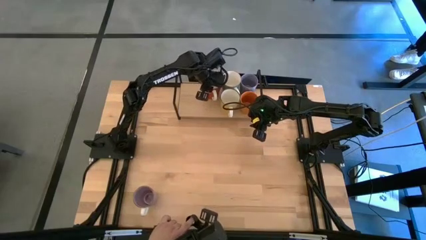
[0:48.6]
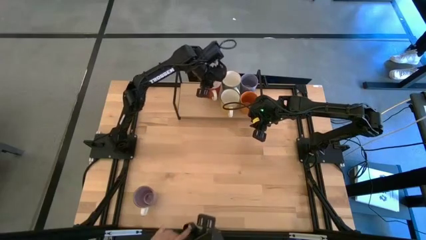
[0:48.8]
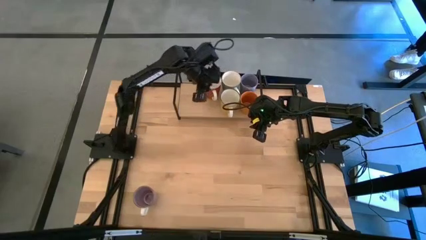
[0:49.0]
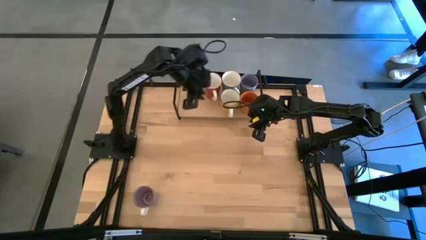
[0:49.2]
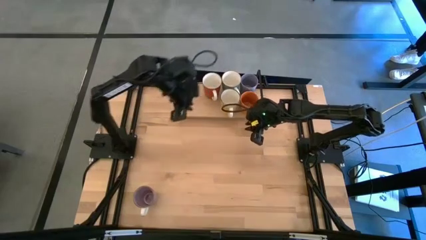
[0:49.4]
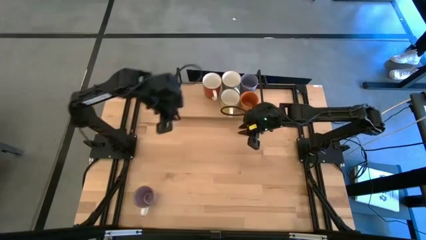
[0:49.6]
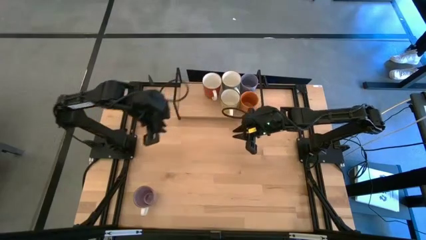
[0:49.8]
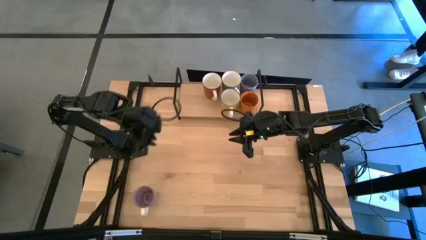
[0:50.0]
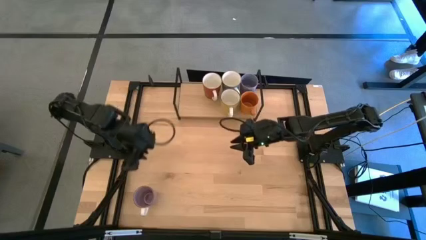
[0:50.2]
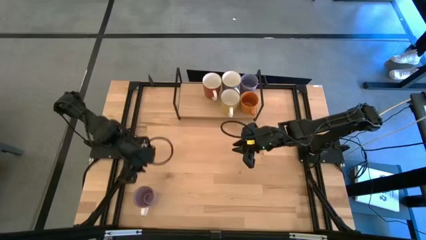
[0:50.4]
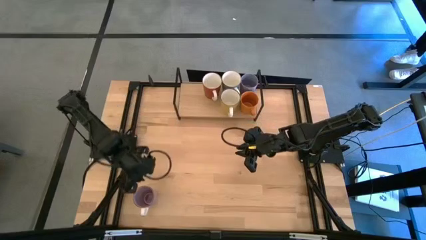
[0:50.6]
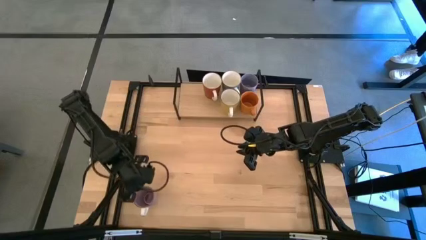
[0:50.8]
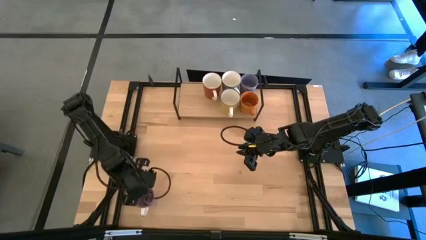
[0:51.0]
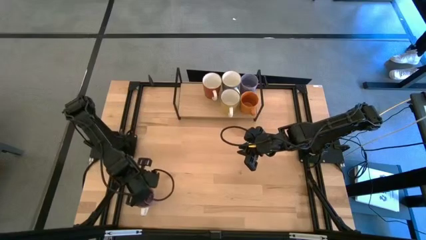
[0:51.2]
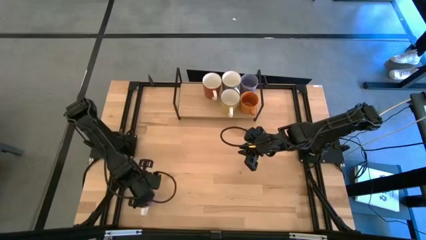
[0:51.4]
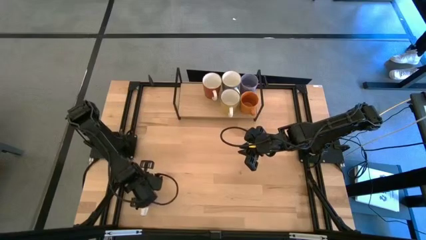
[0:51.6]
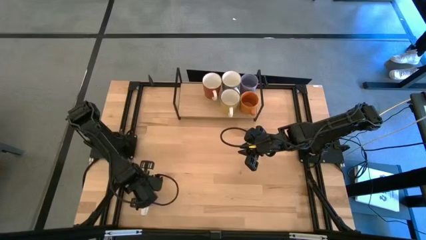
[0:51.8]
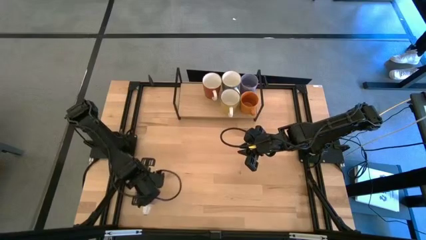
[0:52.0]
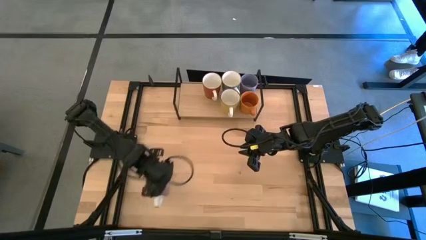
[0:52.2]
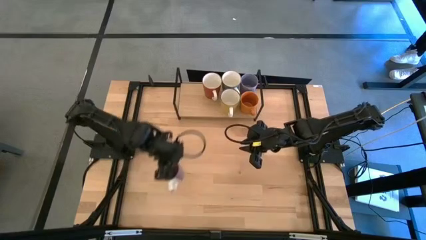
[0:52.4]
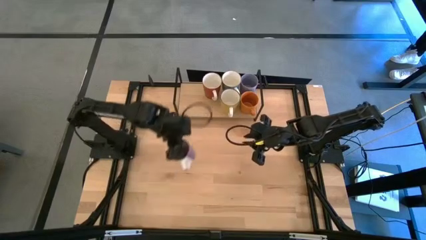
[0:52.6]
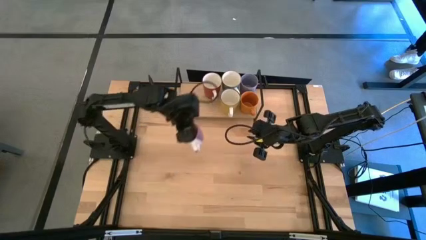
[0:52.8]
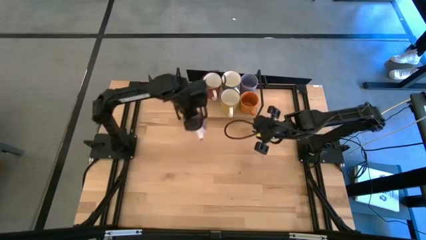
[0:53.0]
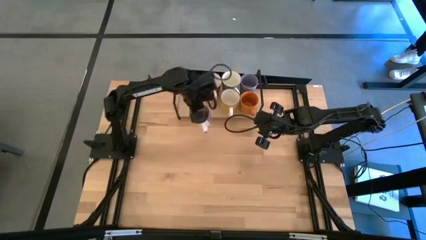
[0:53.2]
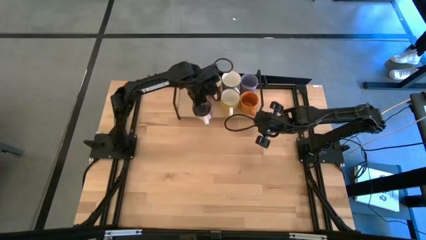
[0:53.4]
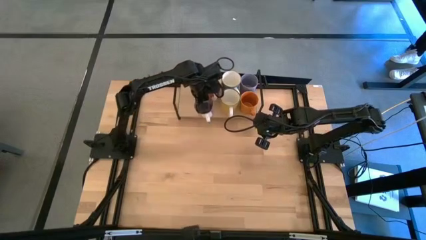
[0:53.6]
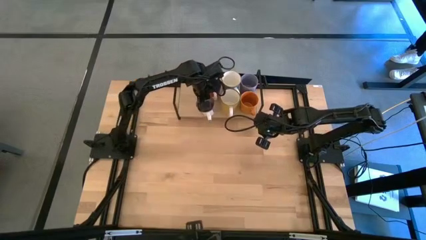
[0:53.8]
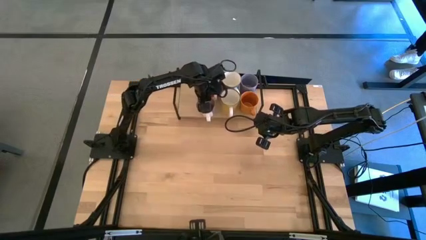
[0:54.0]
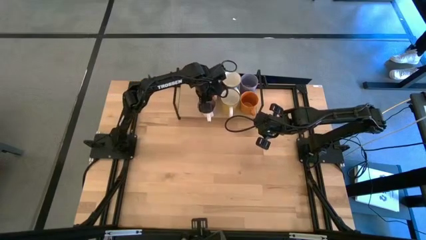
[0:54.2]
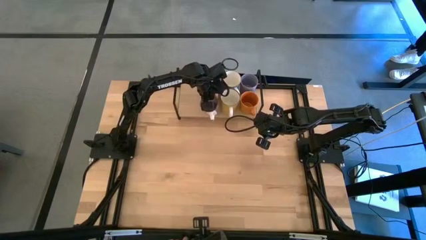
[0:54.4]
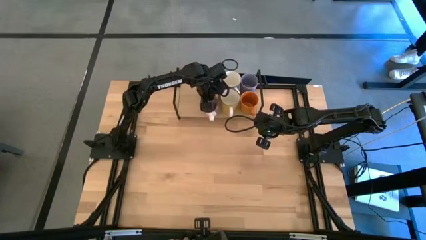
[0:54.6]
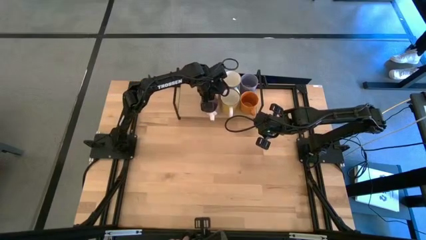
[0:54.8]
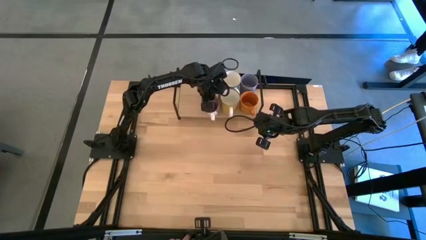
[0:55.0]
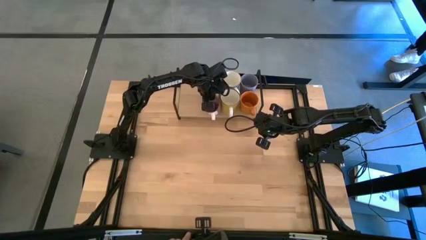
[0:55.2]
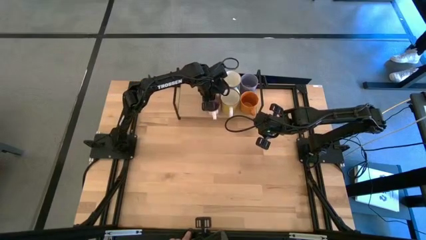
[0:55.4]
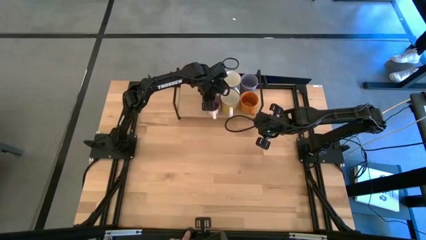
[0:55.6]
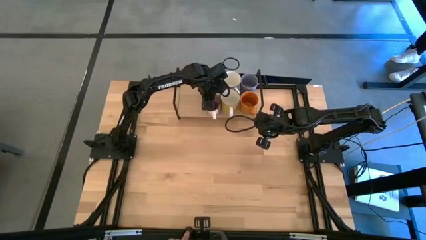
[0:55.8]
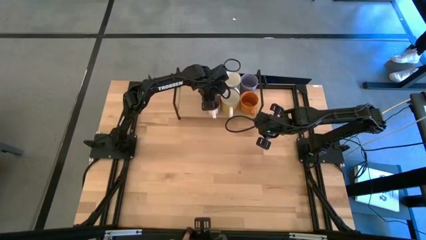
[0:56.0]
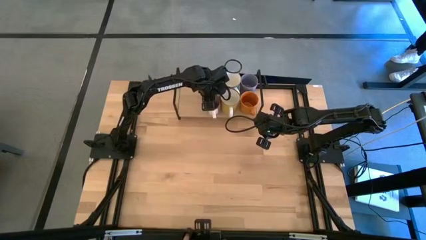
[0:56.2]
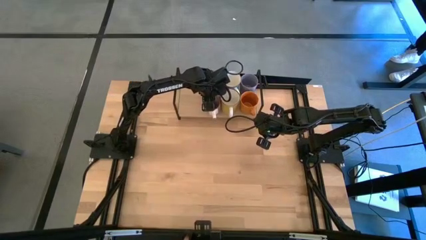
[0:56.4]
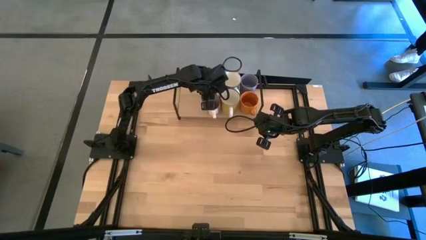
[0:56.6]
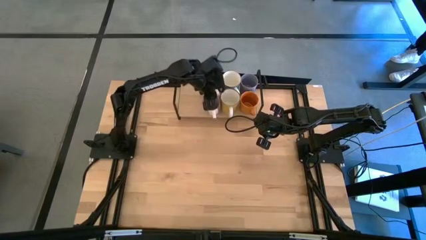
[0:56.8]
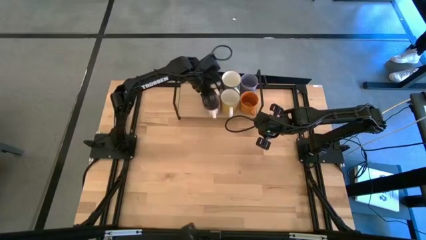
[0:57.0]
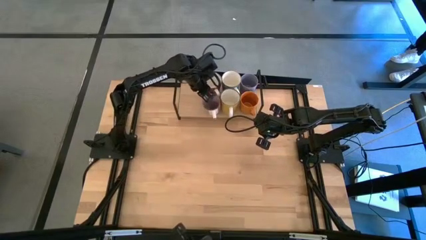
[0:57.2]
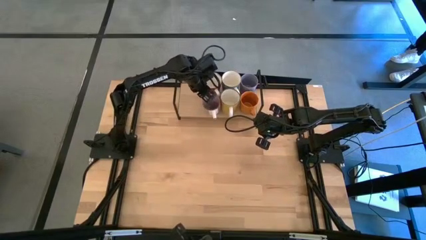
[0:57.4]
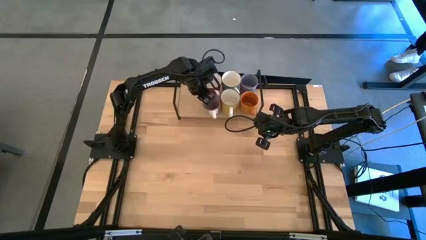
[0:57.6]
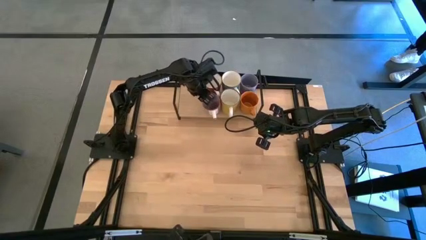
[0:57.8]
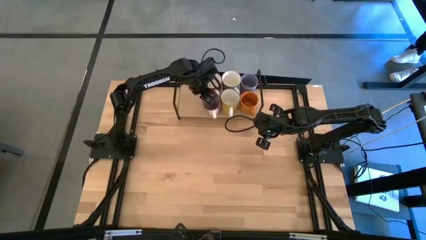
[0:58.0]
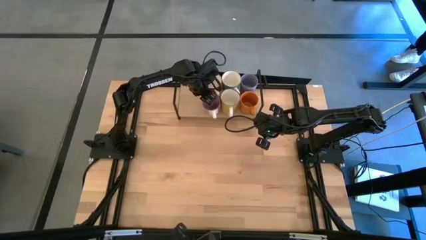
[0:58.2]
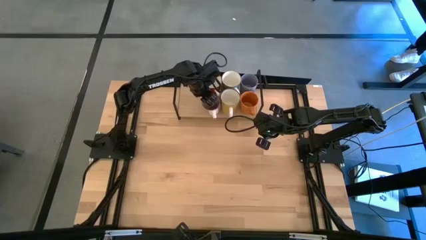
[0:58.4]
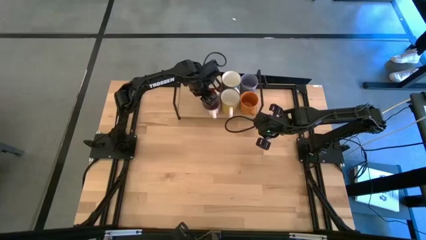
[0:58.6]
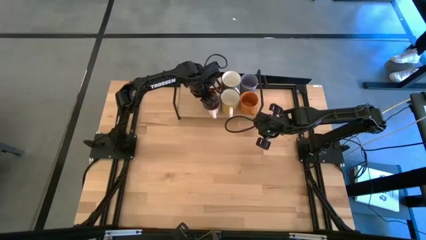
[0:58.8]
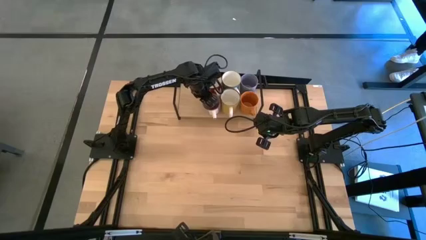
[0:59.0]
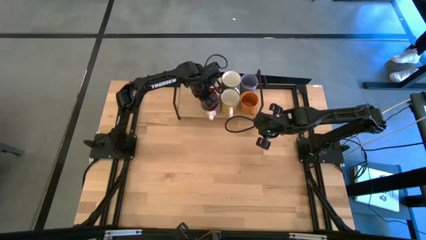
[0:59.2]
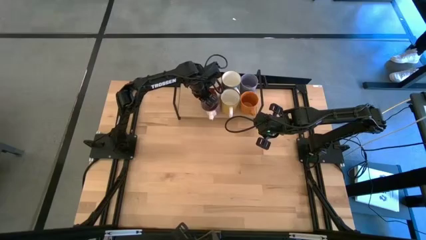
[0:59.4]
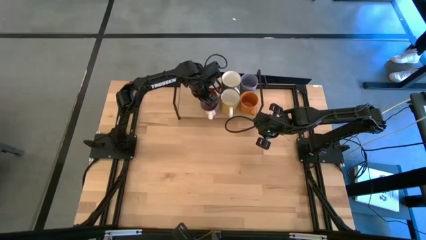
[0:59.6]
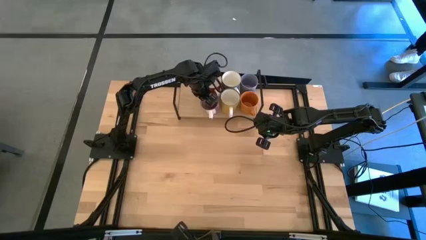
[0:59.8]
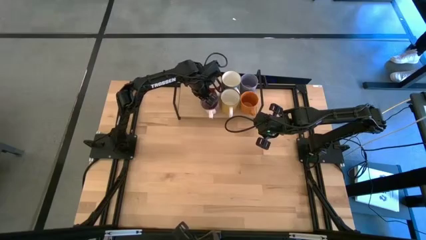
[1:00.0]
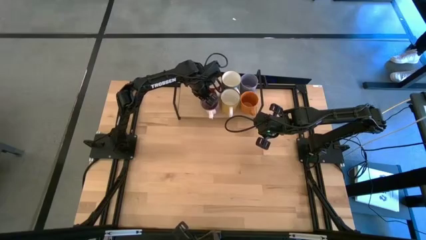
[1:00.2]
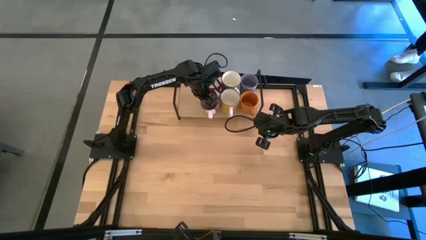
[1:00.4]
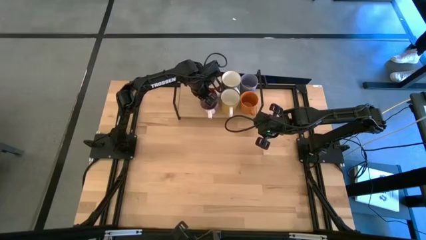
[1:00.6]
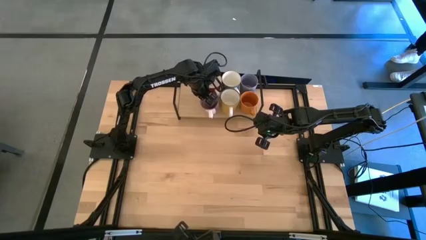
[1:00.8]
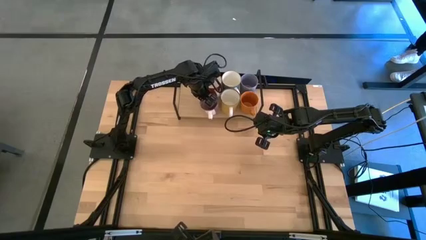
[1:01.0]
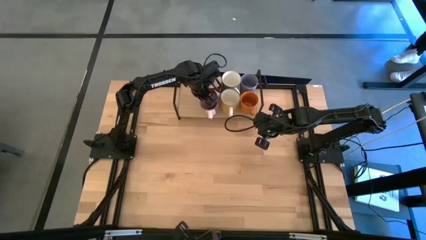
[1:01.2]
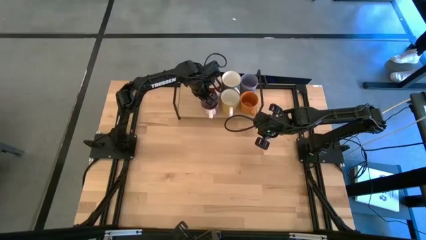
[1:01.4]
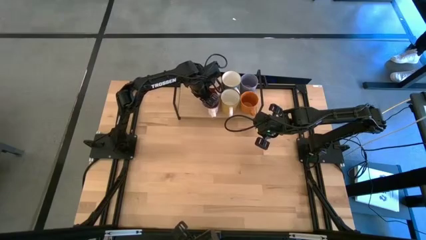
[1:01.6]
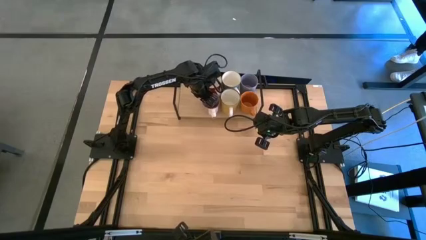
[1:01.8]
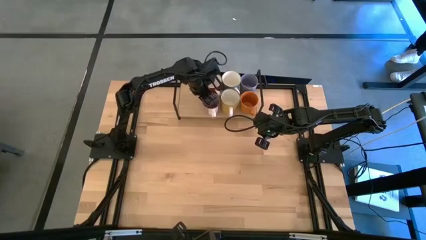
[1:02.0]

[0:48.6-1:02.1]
Task: Place coffee mugs
Put the purple mug on the shelf aligned with the orange mug

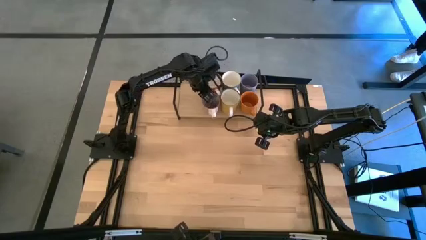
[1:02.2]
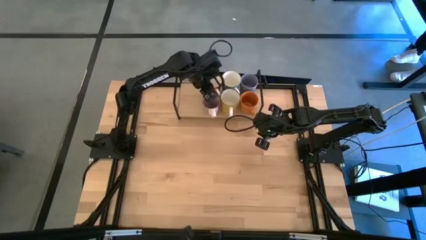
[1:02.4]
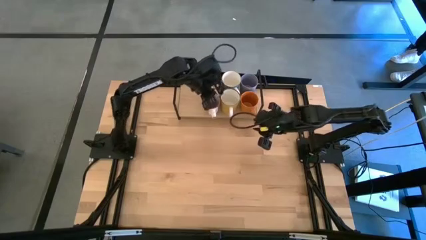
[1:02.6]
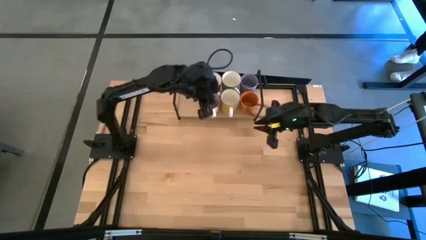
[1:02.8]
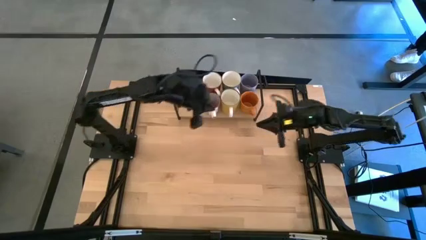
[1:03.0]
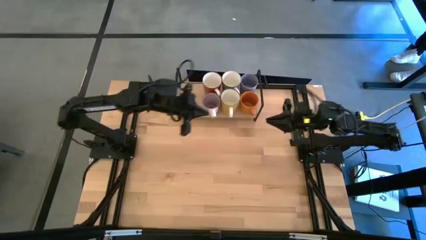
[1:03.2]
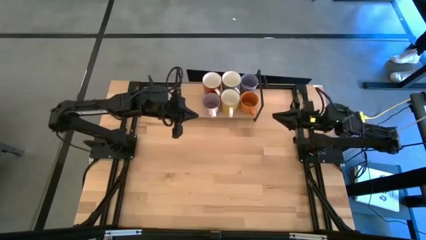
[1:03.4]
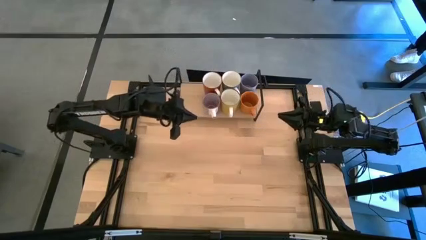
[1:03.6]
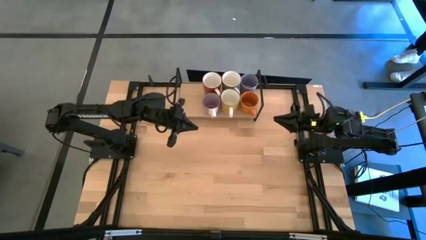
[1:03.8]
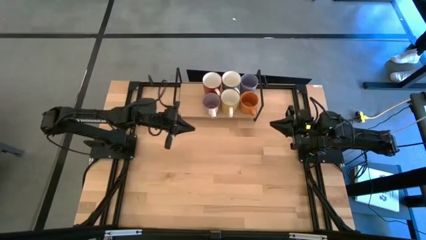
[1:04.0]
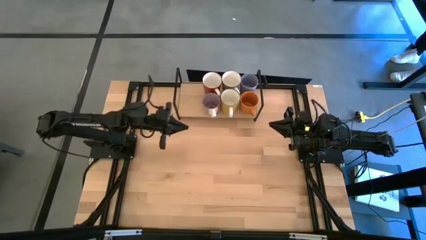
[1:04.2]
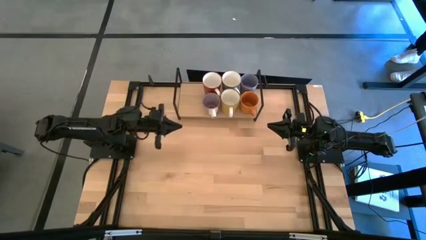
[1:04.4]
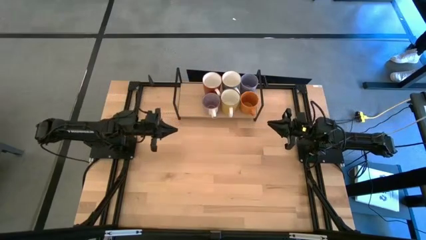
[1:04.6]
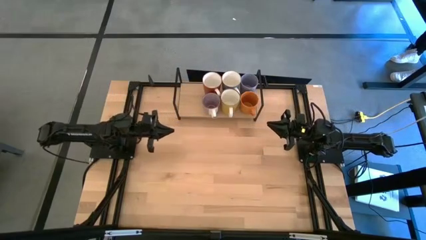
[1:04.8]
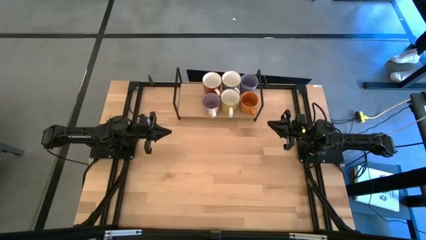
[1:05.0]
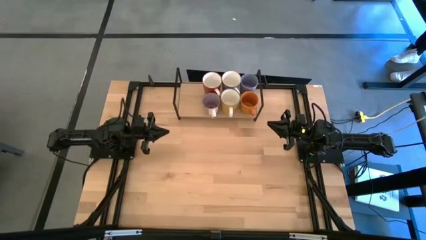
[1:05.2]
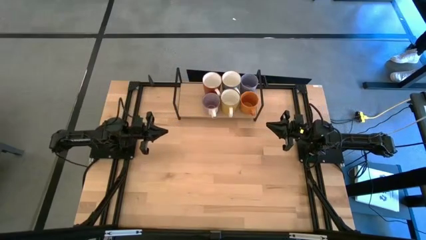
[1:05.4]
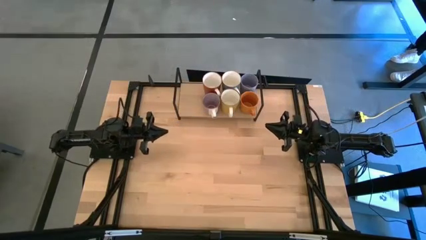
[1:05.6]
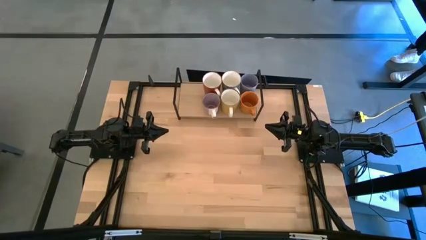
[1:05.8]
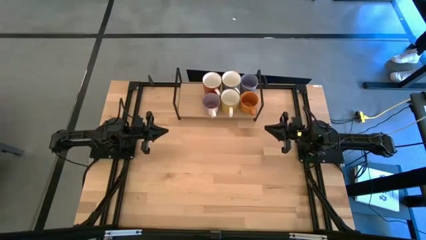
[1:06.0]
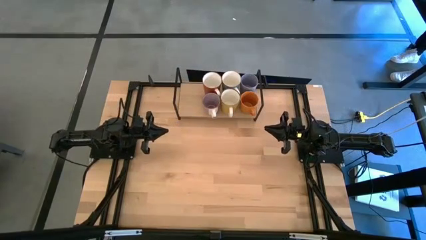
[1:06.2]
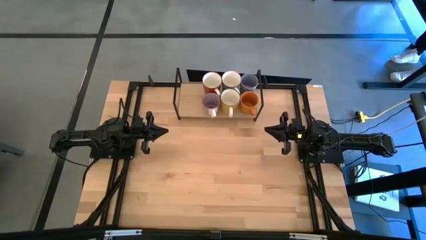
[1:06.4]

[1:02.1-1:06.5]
Return to Home Position
